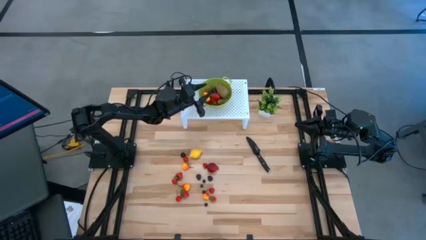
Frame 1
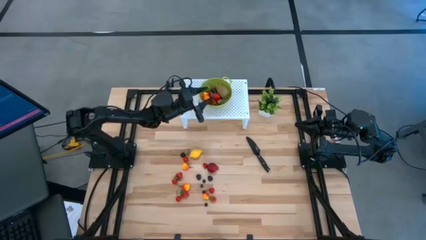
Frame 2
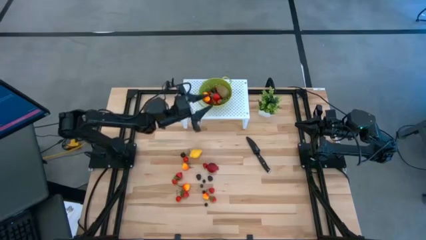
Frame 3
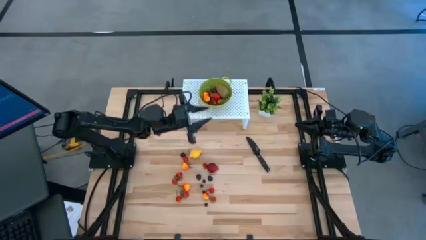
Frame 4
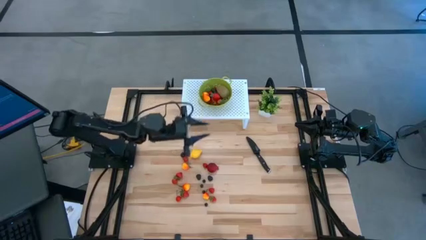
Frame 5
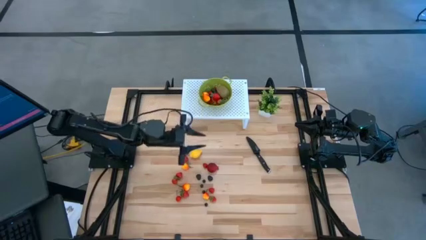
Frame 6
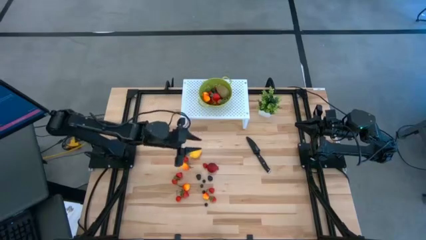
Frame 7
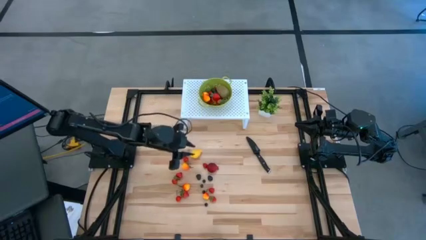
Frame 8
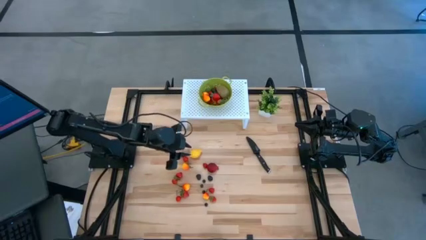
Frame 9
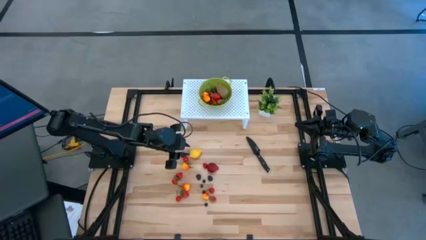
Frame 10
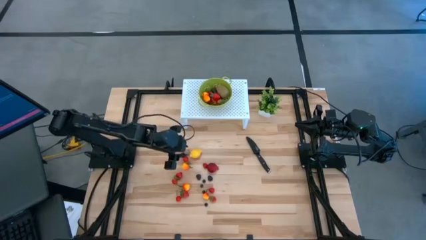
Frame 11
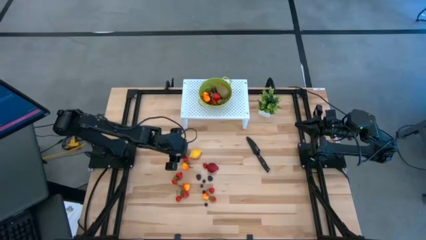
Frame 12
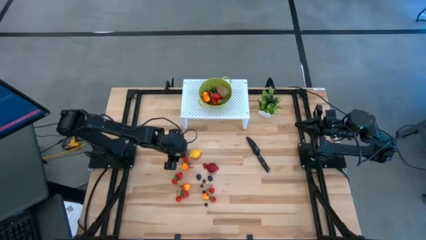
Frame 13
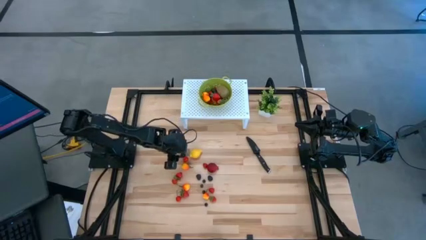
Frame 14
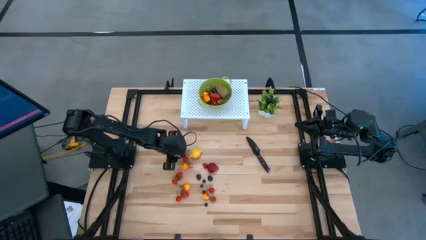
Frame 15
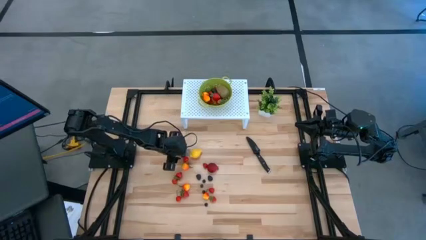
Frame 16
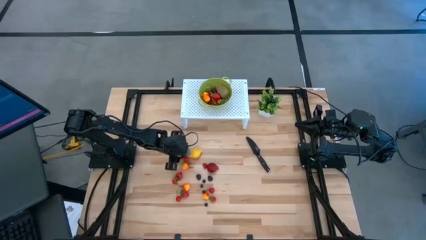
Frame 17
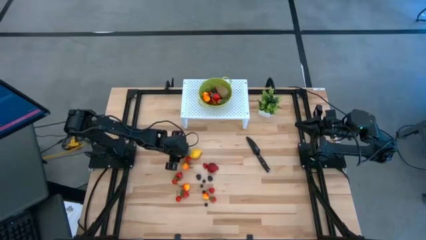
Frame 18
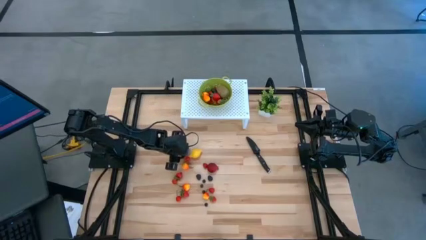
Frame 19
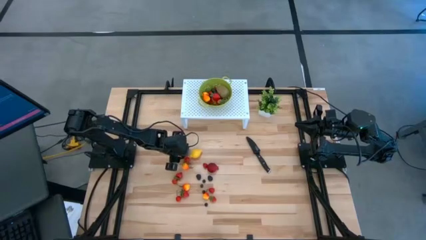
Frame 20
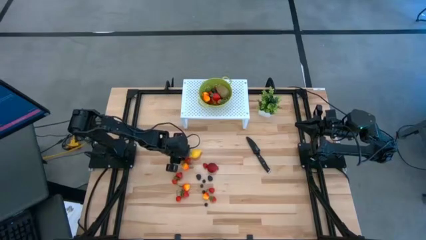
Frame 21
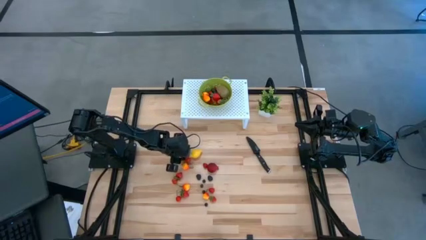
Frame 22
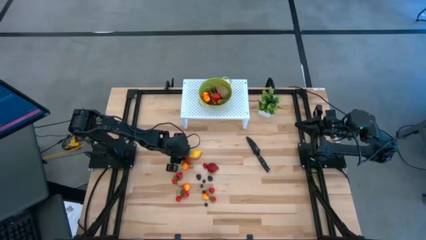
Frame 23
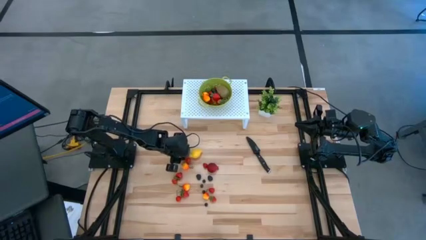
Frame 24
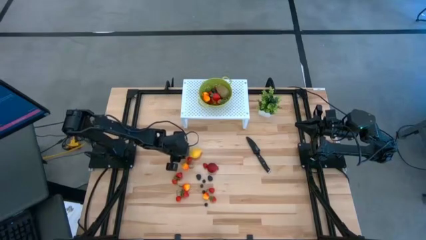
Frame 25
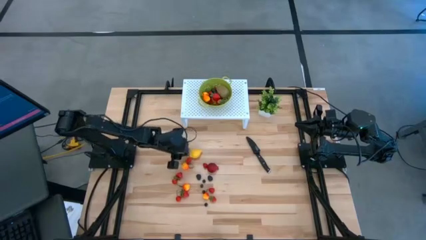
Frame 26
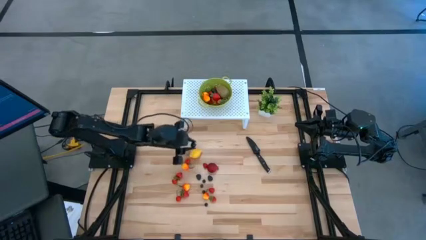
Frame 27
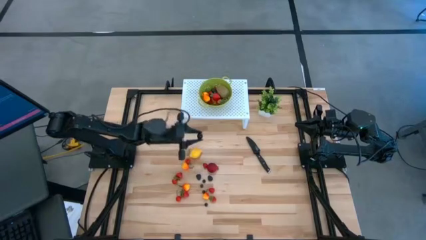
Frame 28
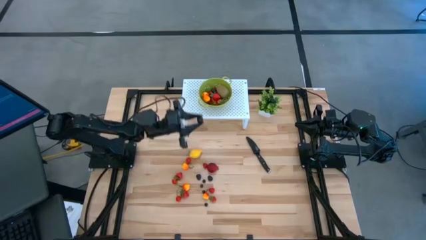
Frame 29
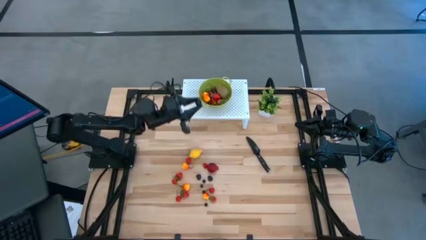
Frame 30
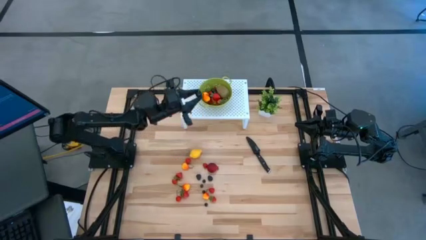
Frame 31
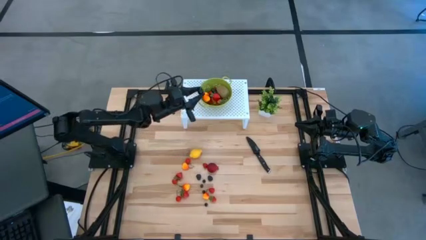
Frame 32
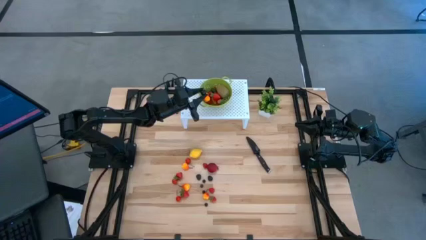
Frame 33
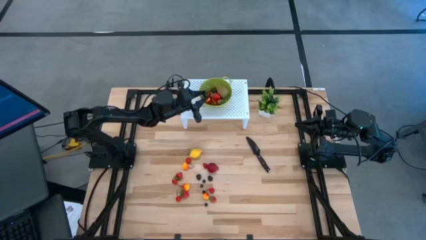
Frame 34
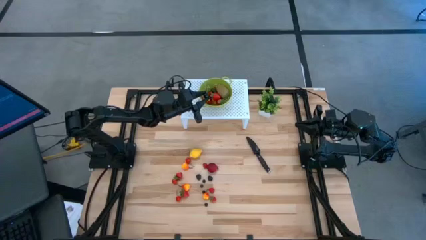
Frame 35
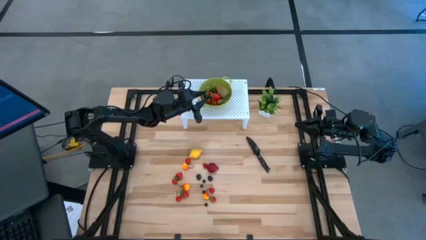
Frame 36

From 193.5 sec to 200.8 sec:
Task: Pick & Place Fruit
Put the black cherry into the green strainer bowl

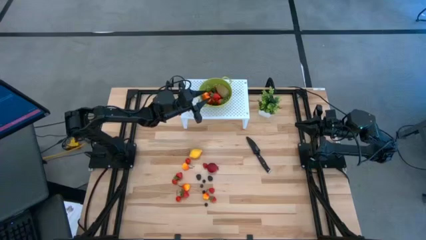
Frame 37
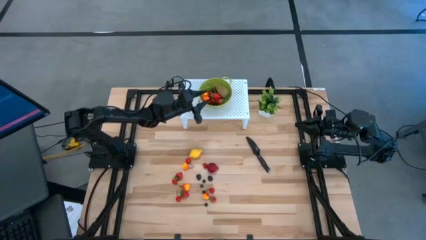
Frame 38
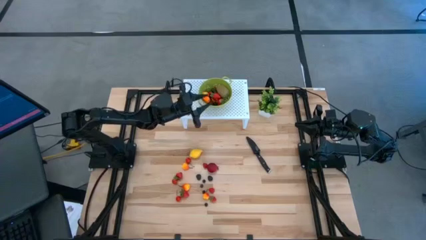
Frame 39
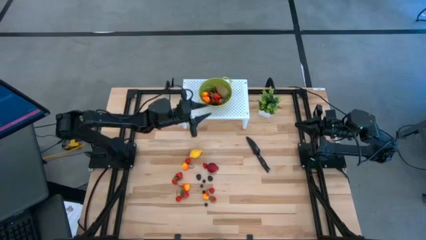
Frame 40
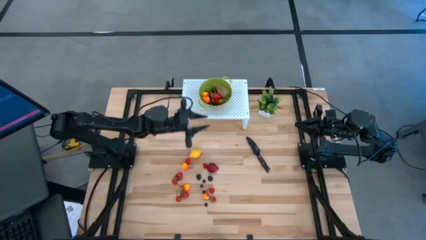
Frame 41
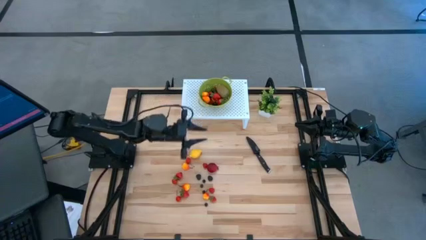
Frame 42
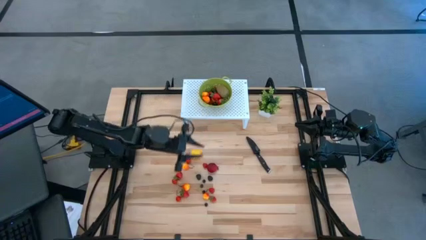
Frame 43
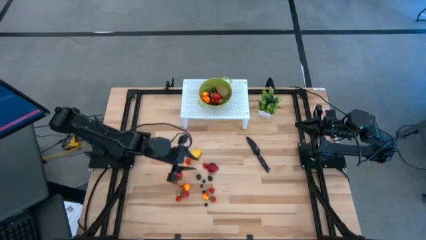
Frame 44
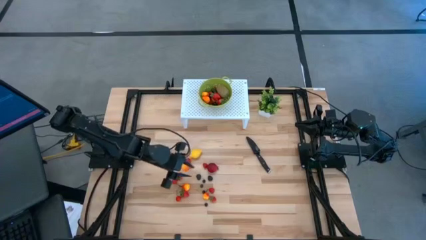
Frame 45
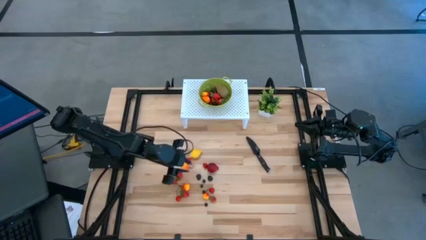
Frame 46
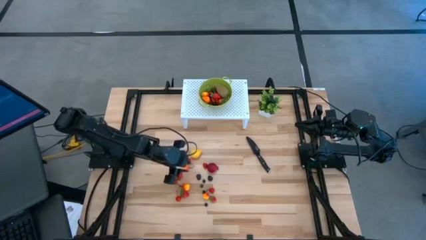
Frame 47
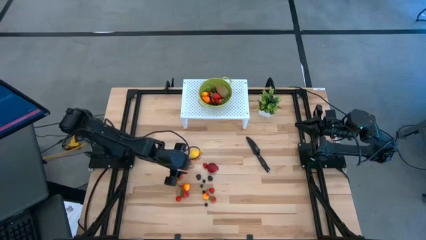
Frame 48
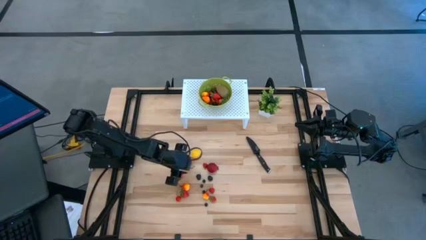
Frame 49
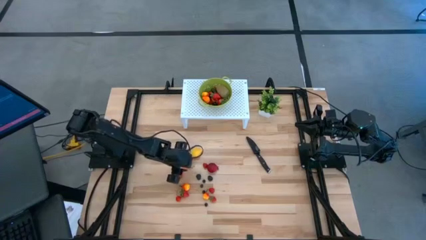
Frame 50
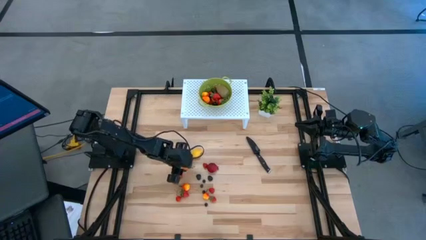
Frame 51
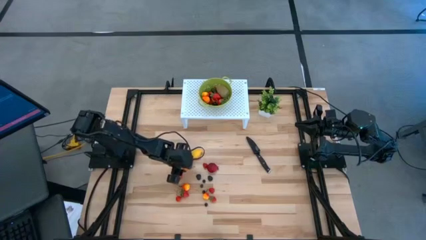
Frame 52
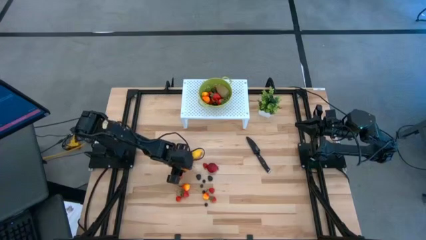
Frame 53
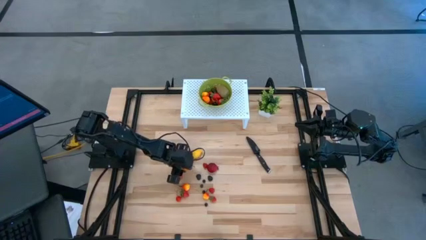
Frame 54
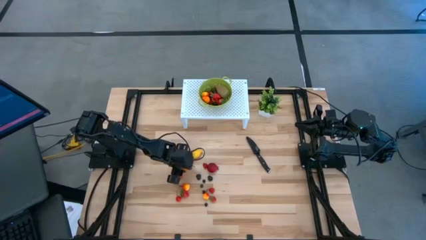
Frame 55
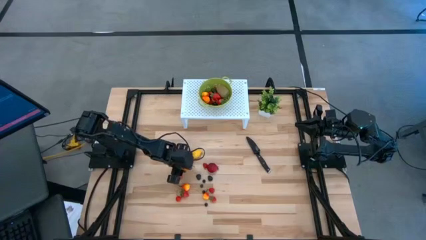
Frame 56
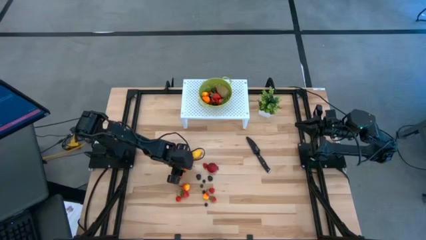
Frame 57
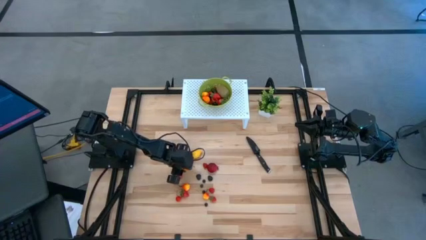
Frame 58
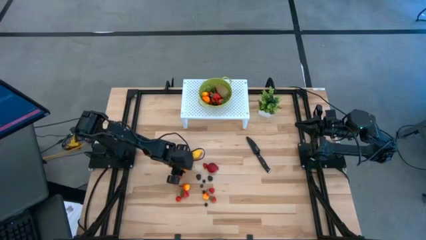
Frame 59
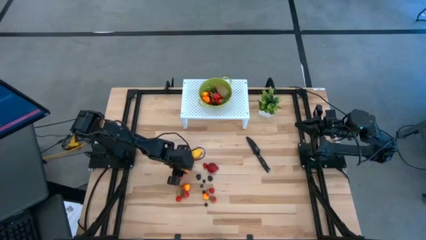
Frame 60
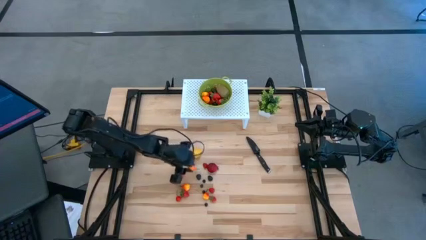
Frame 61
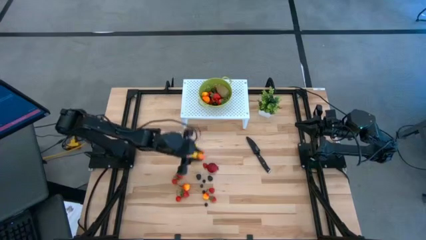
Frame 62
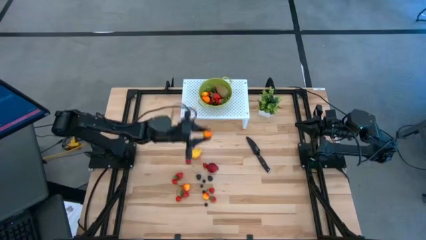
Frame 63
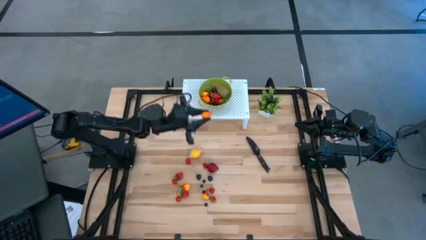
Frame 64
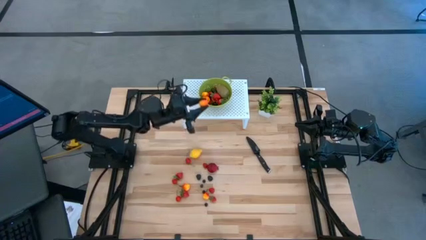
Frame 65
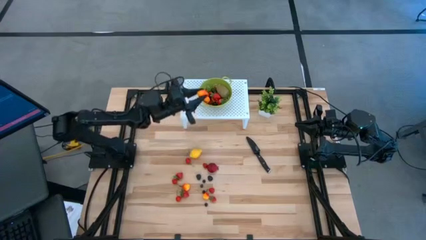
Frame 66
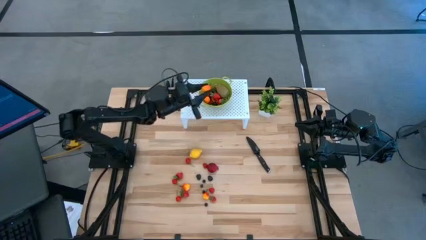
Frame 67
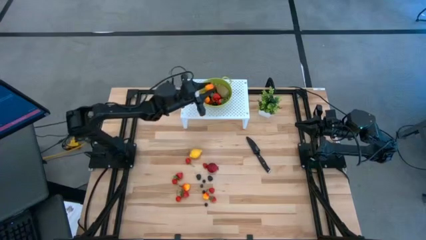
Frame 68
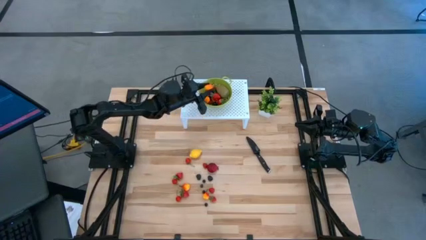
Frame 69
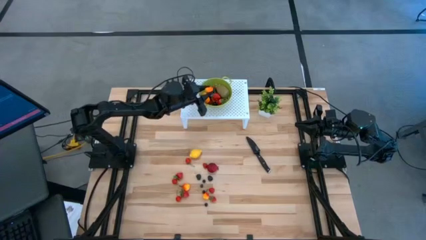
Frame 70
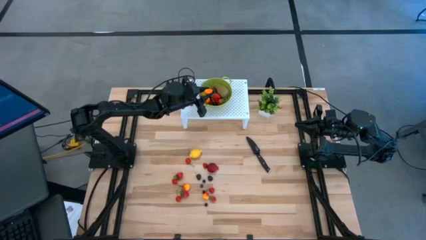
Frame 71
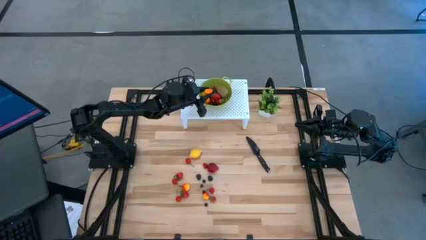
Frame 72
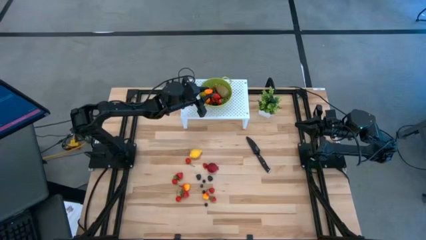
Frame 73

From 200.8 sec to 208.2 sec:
Put the yellow peach into the green strainer bowl

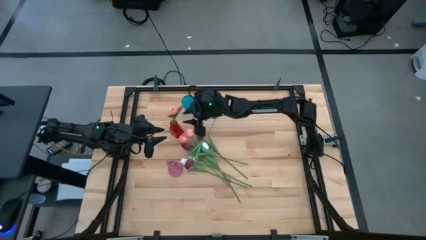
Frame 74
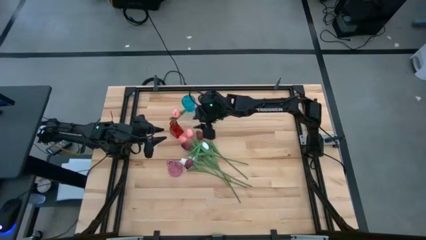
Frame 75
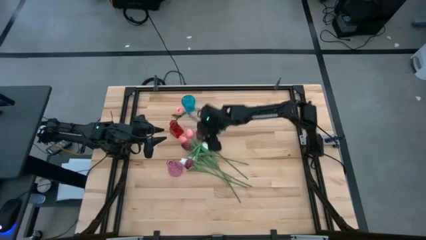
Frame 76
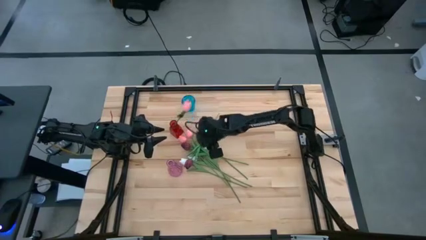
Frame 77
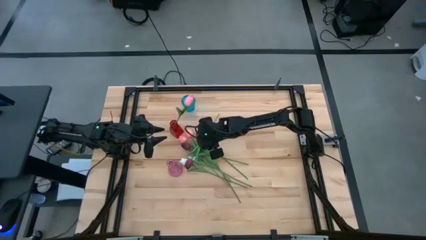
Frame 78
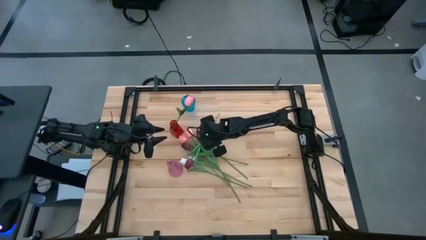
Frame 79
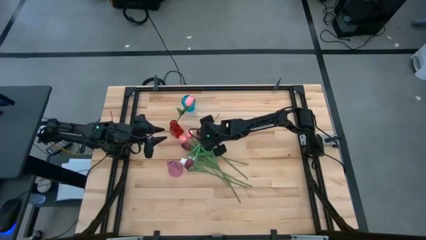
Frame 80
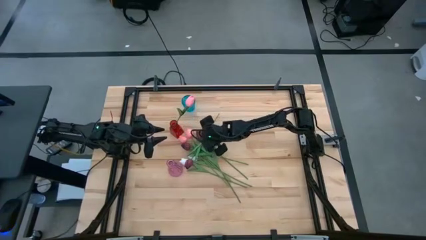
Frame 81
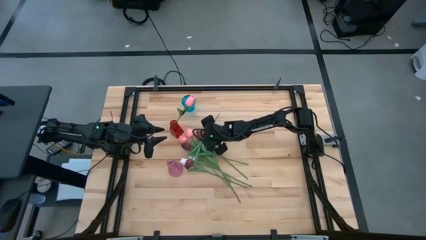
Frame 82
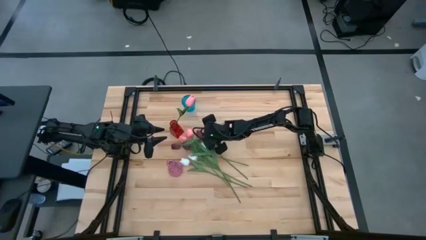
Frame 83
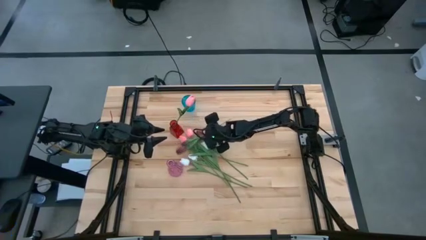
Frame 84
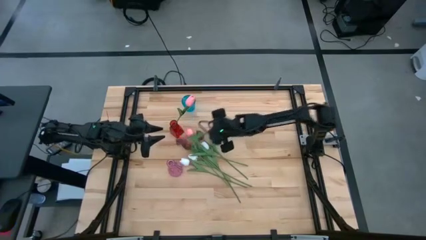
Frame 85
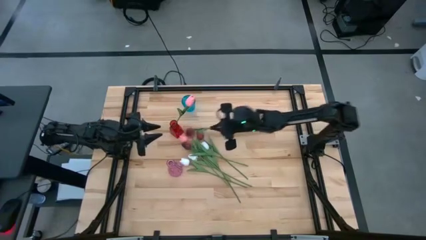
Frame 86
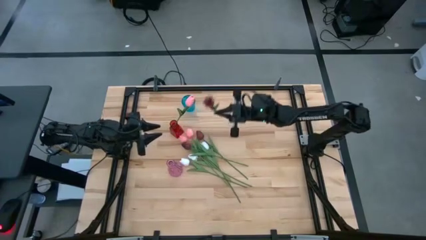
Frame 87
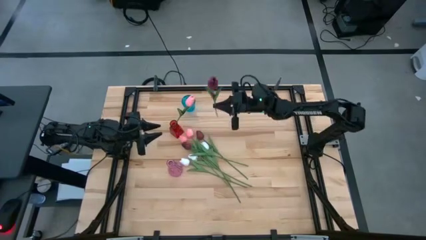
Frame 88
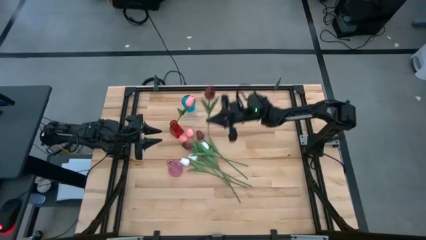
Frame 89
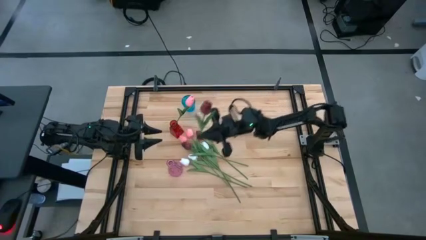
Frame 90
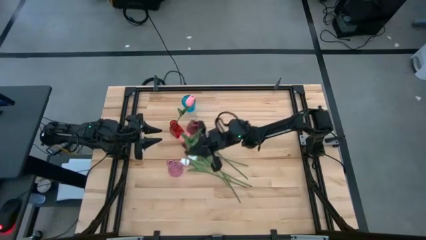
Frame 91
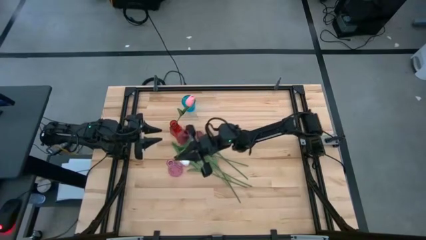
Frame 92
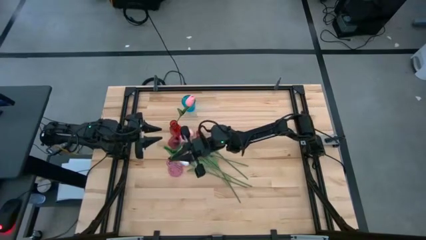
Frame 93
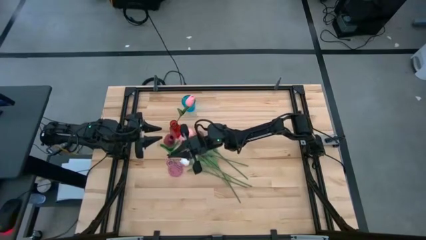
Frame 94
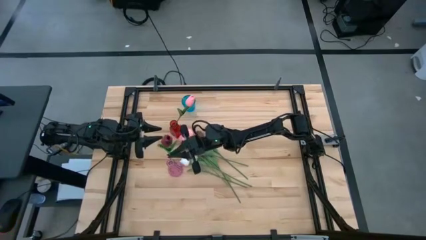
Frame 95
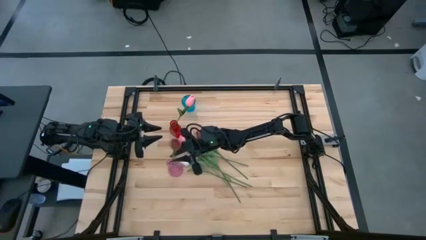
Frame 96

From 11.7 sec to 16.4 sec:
Task: Sort flowers into vase by color
Put the red tulip into the pink vase
